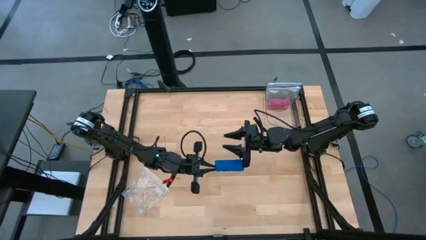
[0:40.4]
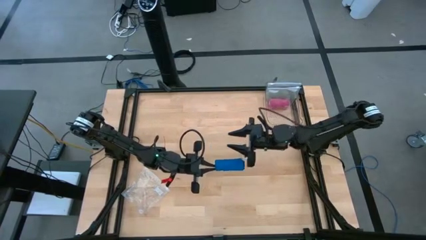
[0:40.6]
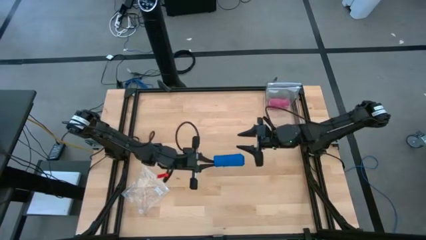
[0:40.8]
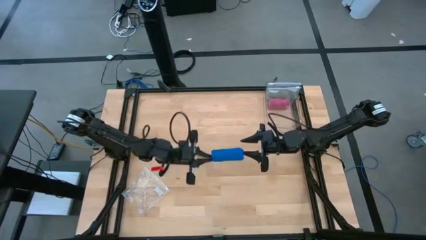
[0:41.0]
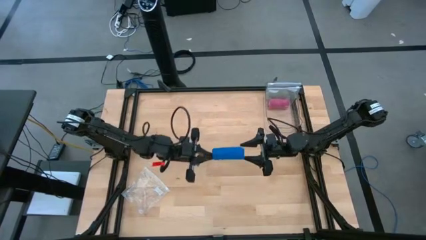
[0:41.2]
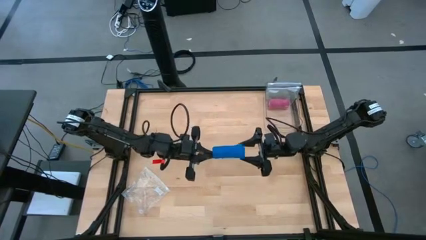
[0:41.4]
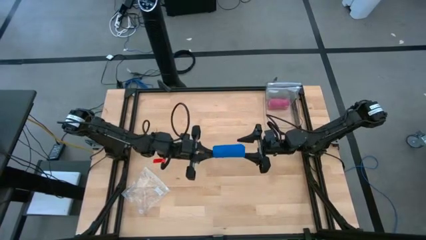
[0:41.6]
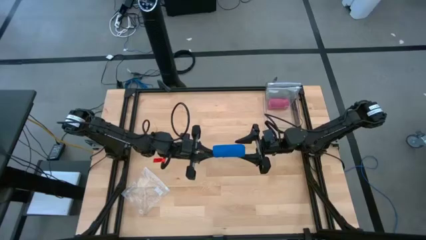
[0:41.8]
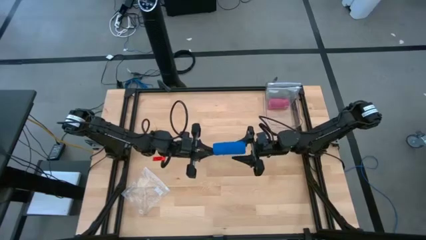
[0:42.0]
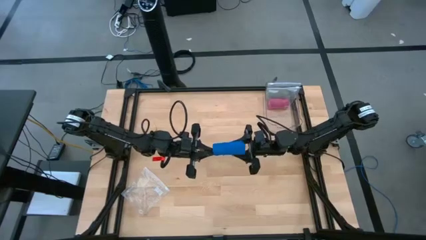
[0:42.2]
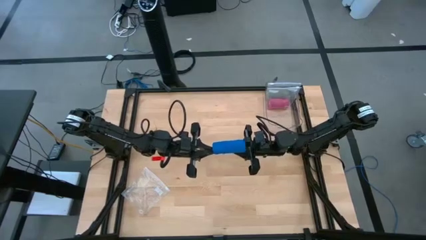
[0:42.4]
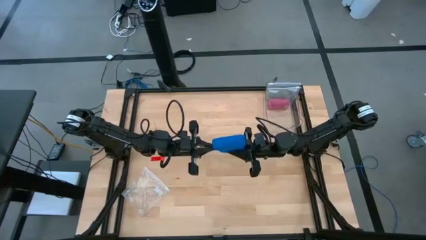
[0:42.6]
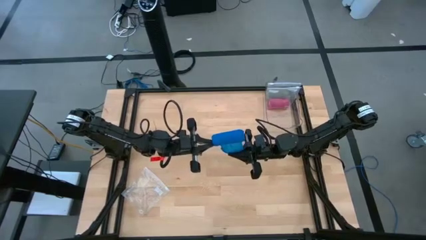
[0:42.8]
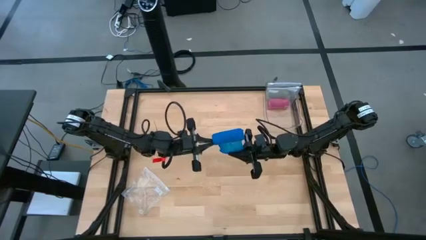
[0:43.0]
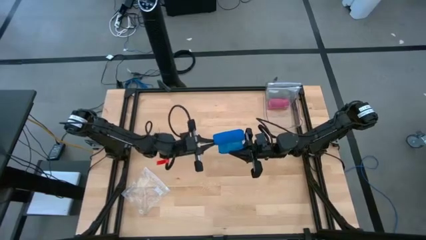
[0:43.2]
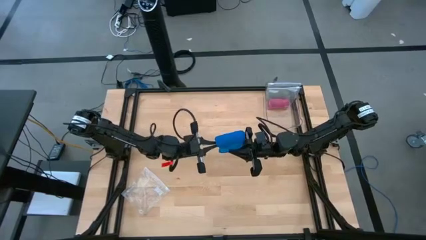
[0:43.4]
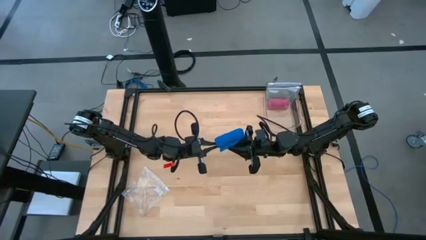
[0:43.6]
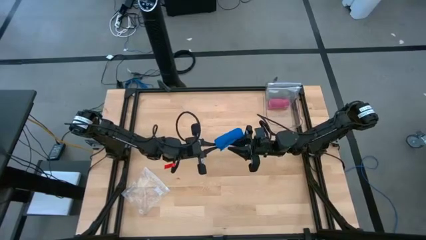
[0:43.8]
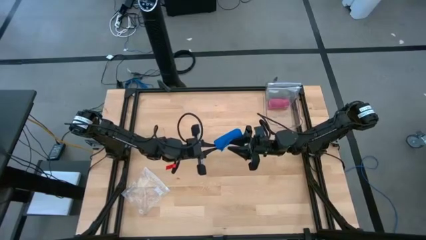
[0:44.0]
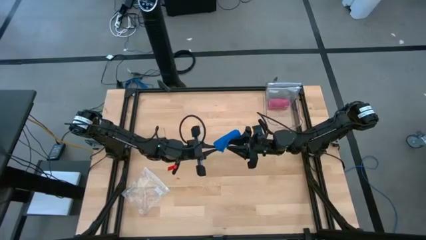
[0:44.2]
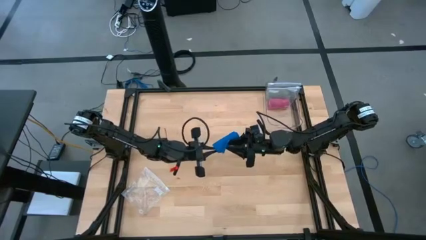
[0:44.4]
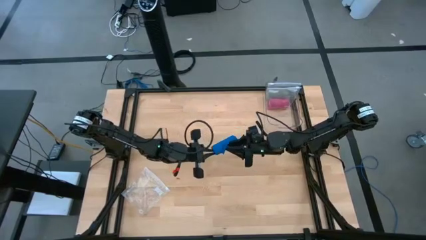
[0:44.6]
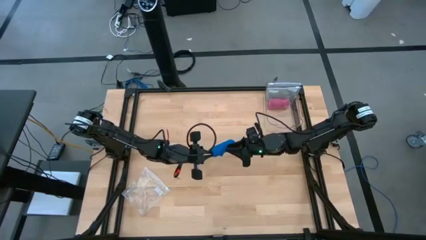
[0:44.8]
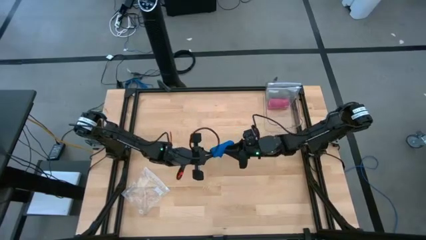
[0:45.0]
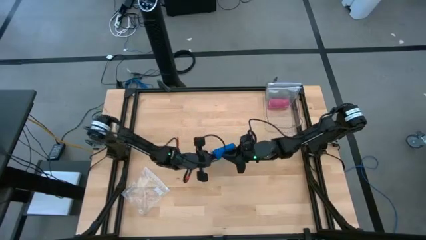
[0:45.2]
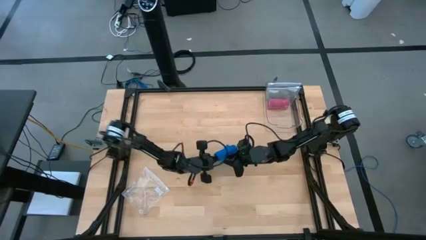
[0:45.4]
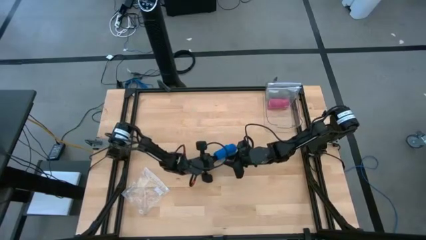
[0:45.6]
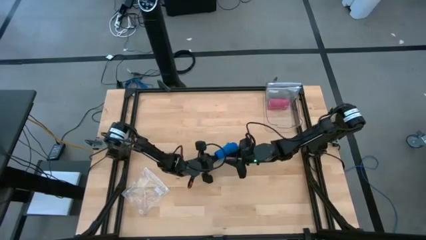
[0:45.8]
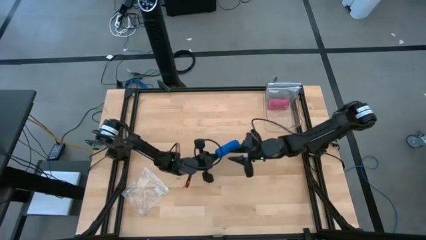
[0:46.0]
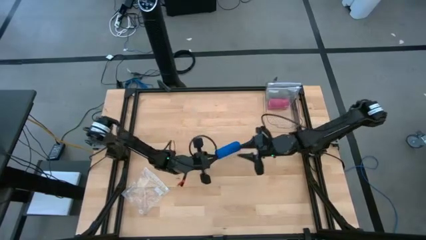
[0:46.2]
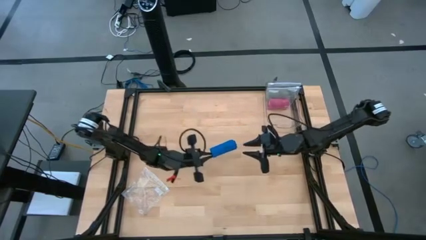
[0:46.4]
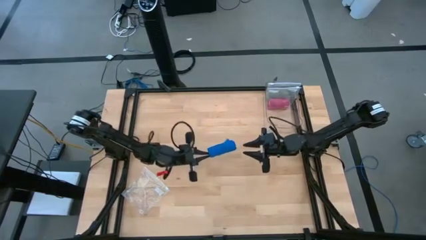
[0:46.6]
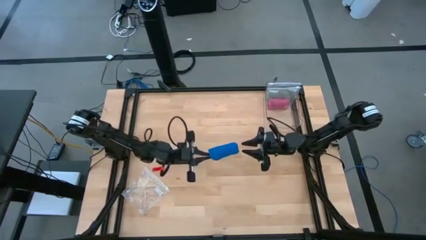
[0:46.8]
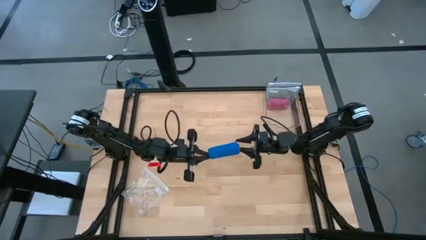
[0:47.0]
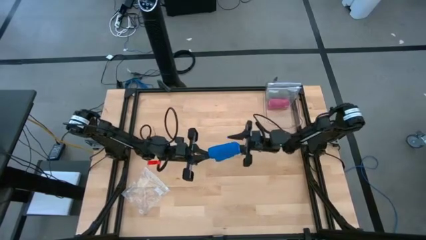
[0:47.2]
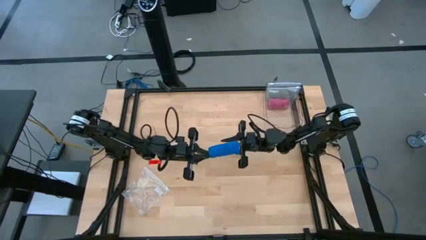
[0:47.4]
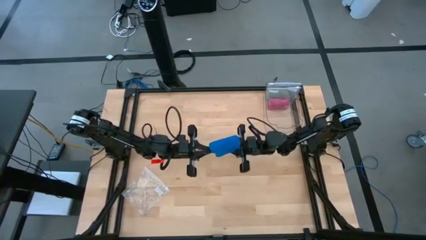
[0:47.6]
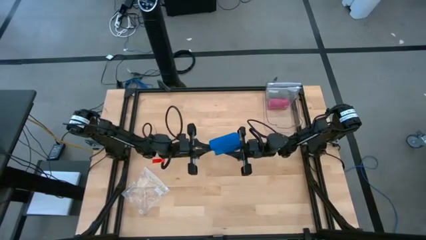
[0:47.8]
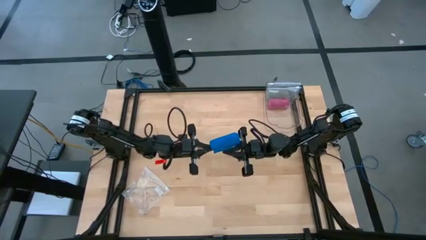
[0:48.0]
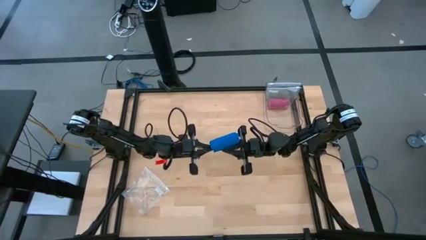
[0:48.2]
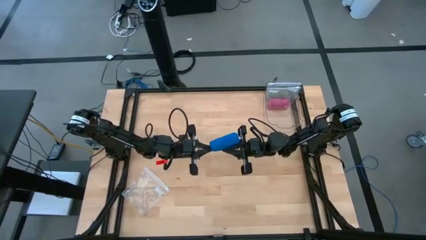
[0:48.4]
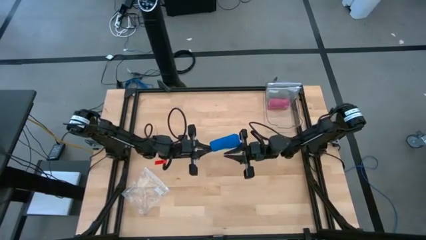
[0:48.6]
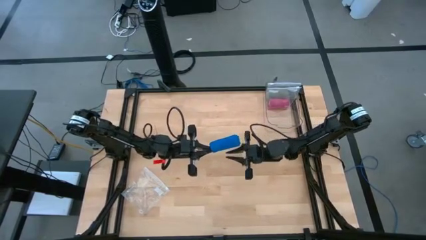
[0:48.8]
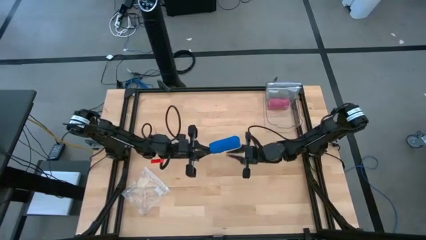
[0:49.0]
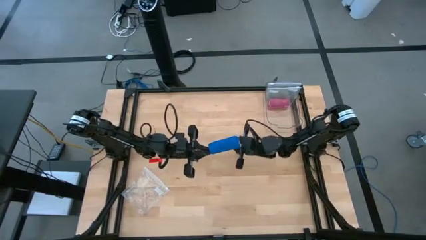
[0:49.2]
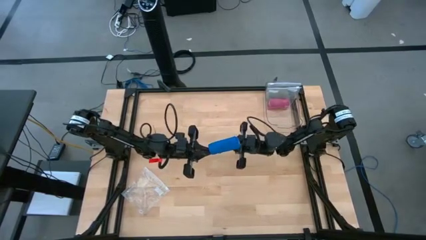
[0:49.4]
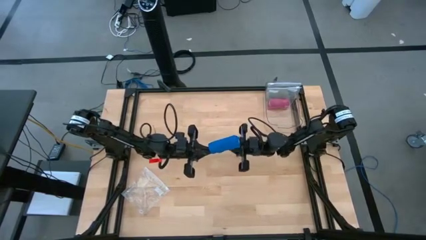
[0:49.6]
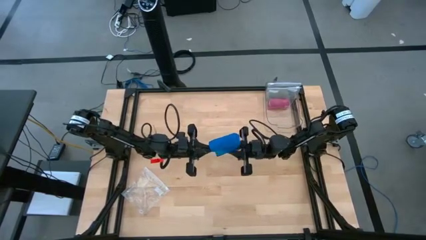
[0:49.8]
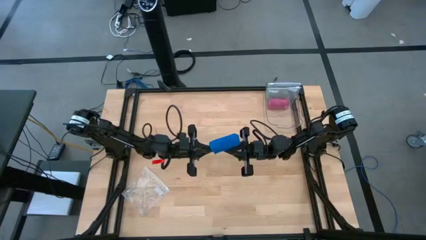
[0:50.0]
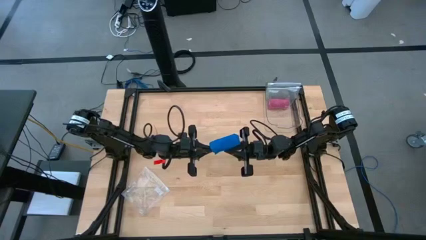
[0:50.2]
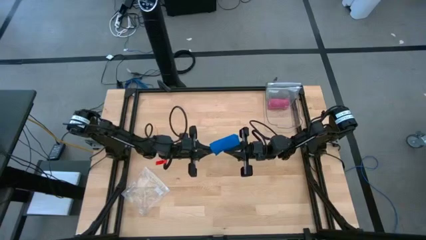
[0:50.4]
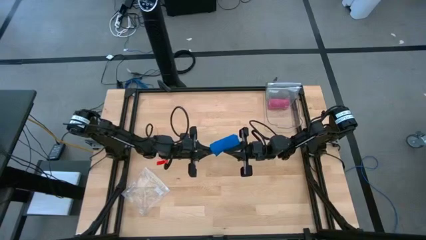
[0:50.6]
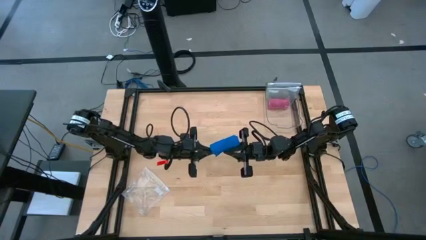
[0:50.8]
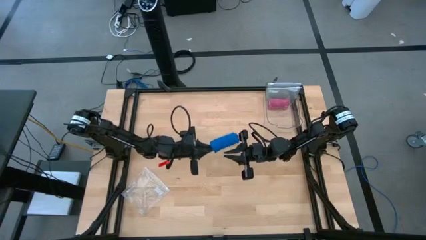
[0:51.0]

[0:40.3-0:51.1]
Task: Roll bandage
Roll the blue bandage

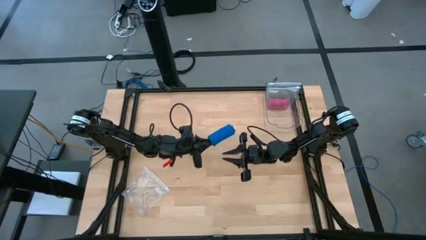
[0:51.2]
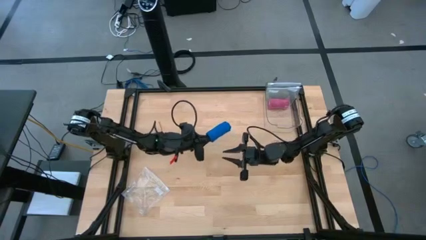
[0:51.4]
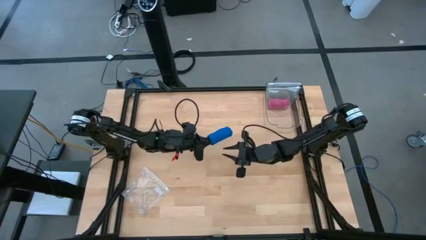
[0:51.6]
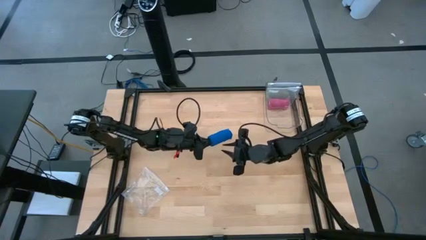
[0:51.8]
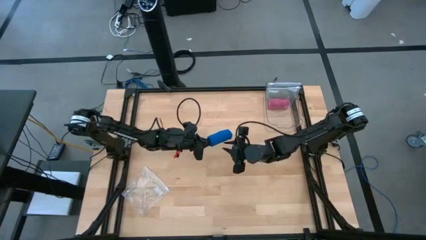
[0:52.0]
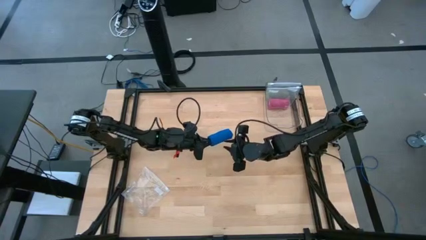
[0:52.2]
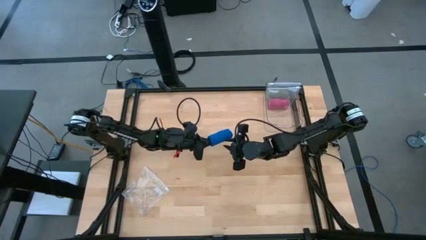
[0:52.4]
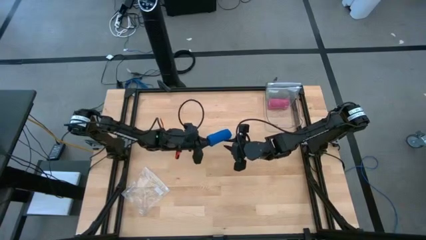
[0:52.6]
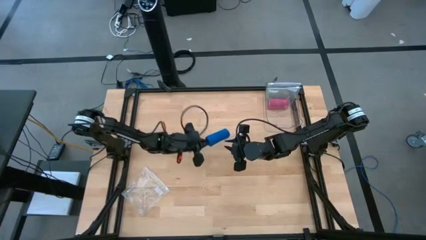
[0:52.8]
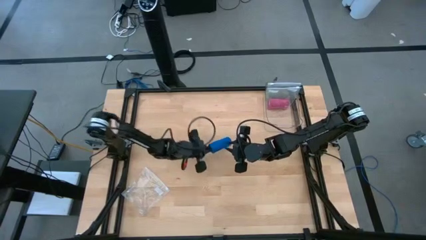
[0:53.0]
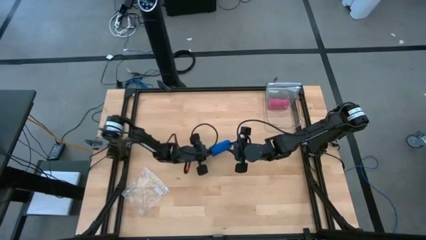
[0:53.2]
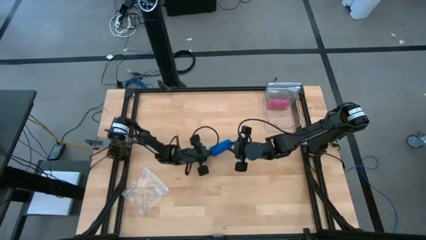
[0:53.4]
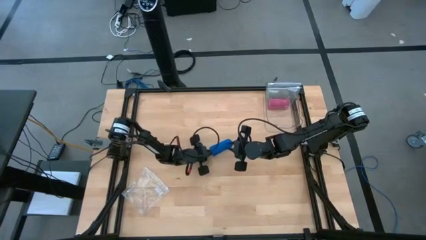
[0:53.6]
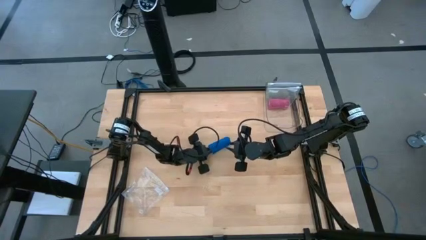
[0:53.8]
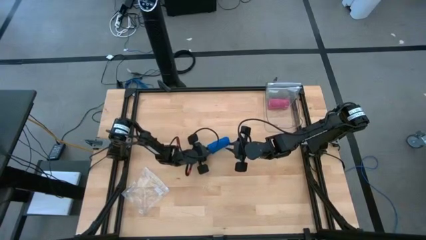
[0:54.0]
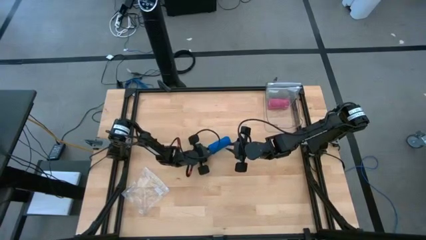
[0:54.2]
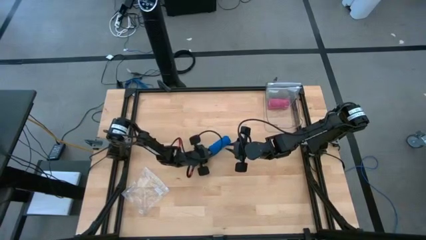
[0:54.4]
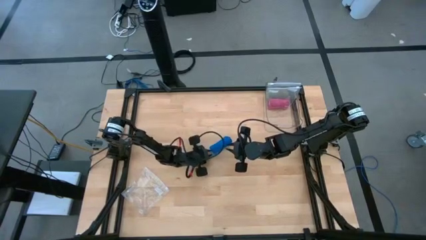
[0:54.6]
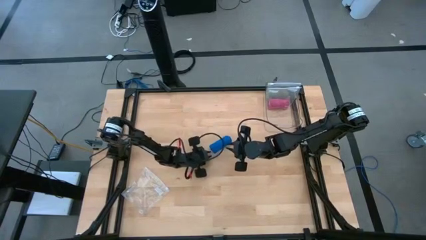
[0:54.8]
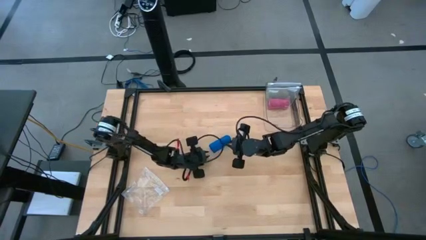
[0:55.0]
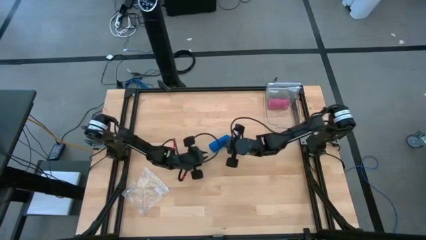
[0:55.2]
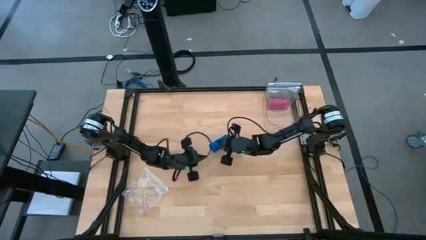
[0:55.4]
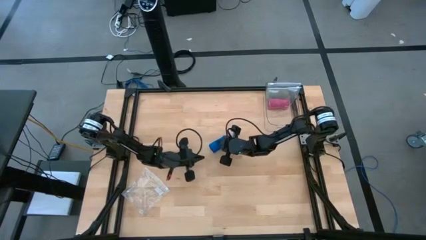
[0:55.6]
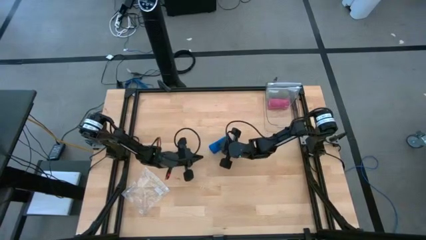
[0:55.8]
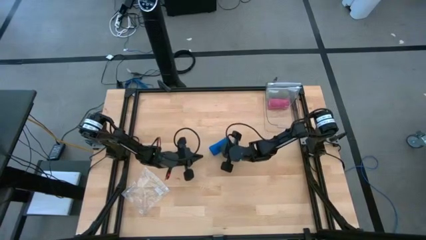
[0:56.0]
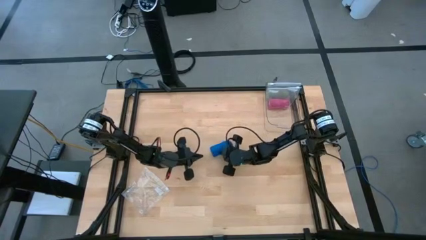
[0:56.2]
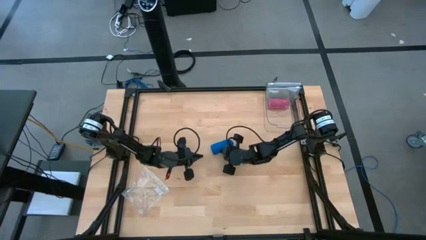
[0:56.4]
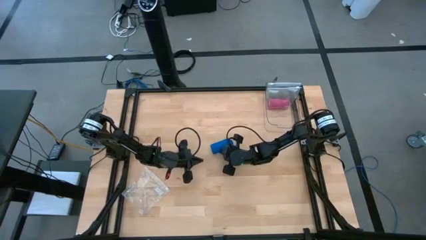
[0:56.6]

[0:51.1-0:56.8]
Roll the blue bandage

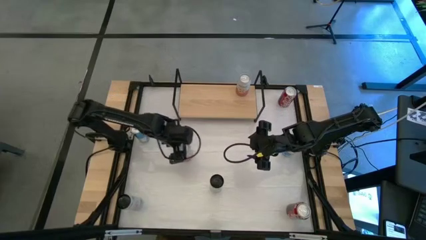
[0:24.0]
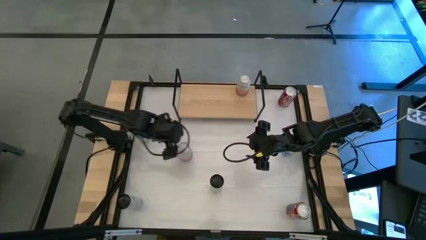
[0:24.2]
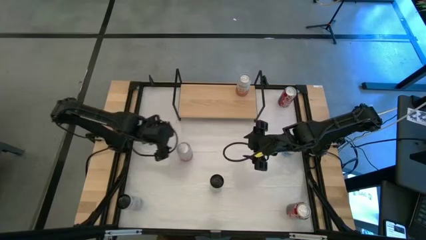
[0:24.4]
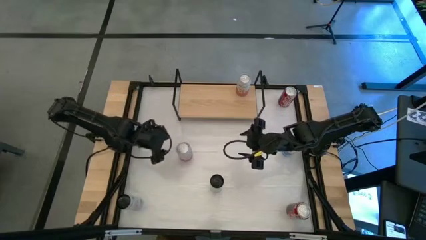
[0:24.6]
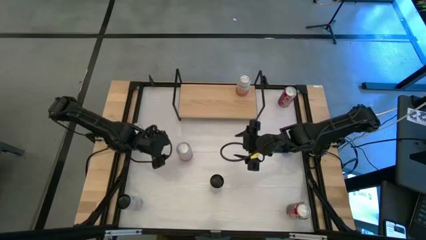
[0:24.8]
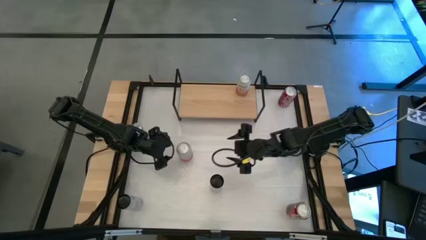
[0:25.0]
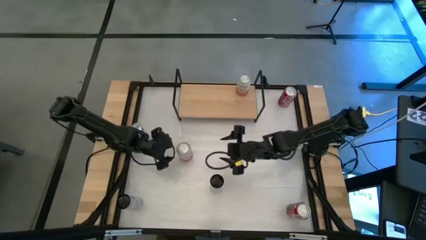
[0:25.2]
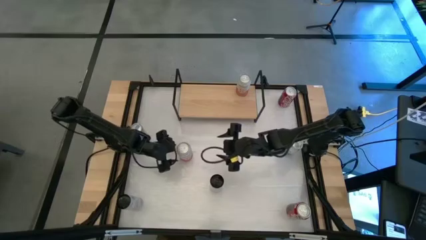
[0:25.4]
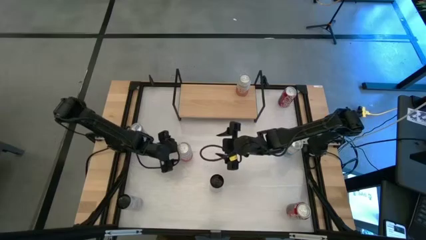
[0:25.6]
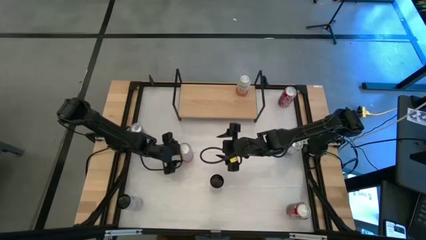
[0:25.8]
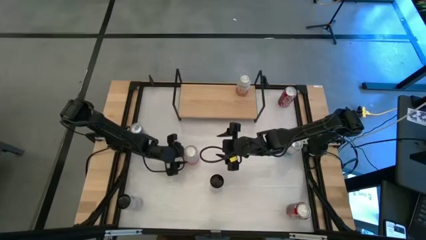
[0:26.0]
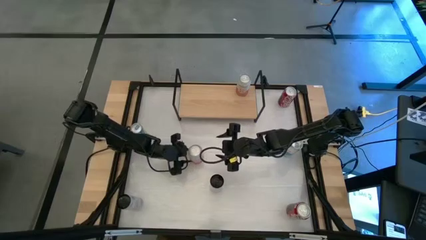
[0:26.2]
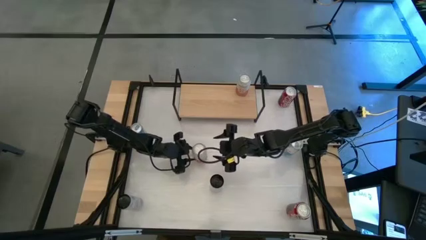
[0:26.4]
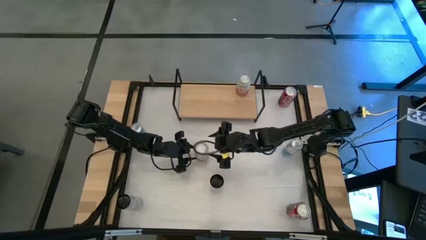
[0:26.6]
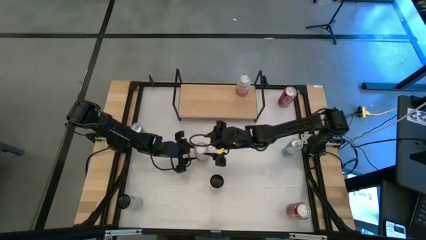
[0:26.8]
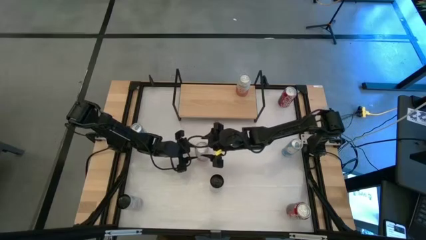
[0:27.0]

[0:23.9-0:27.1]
Task: Place canned beverage on shelf
Adjust orange soda to the center
